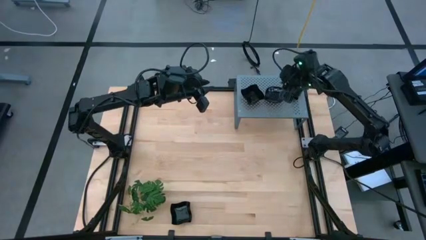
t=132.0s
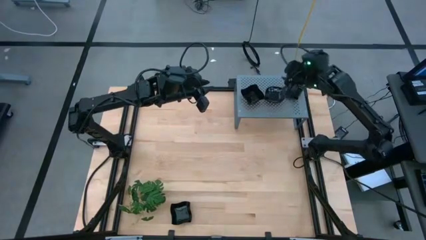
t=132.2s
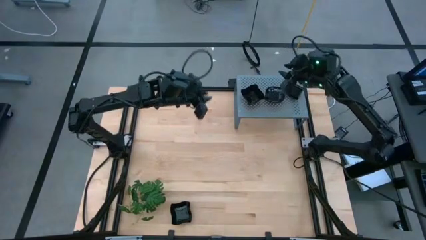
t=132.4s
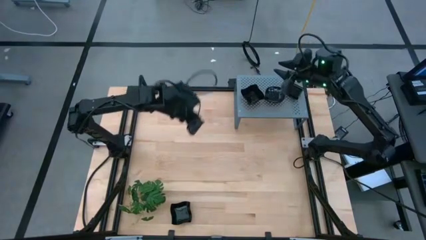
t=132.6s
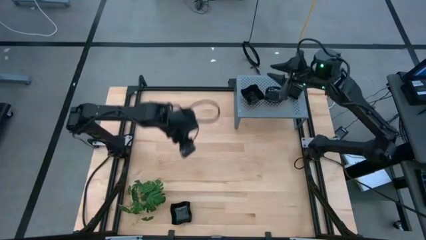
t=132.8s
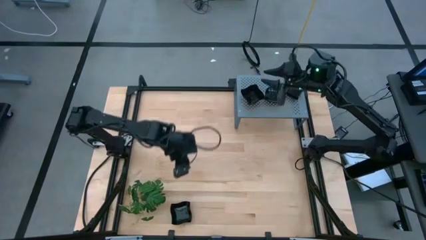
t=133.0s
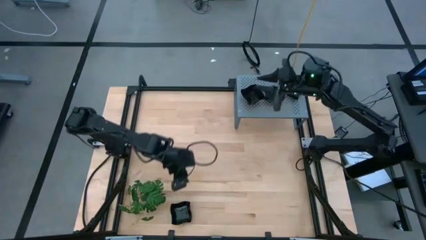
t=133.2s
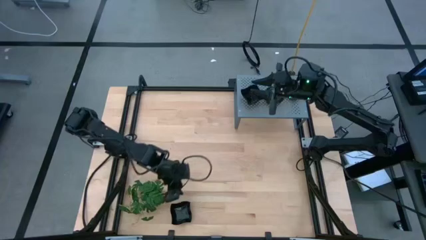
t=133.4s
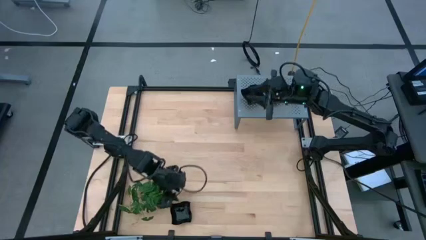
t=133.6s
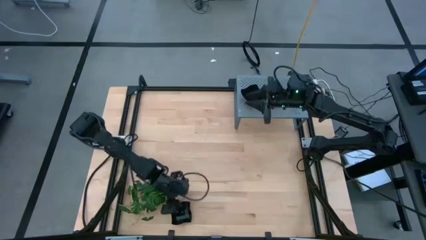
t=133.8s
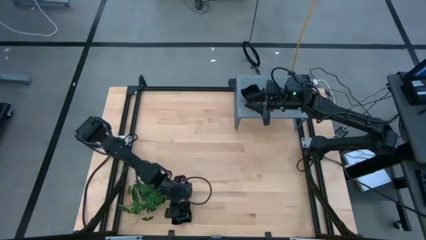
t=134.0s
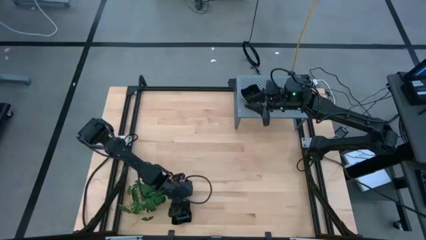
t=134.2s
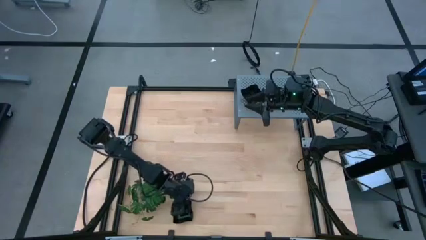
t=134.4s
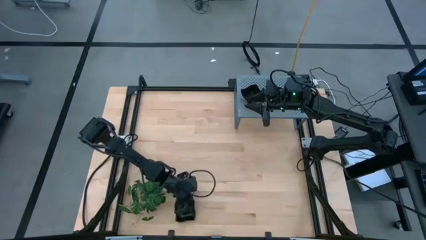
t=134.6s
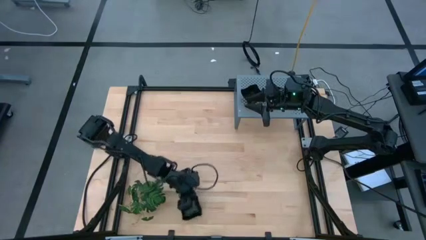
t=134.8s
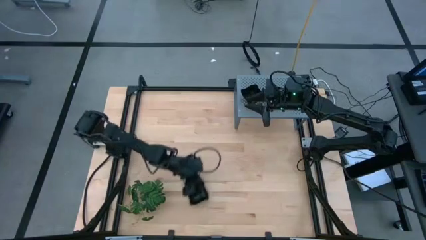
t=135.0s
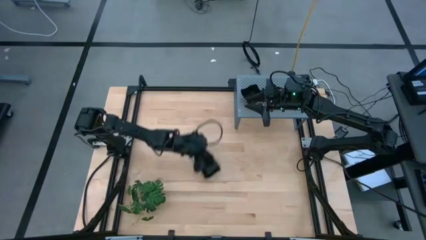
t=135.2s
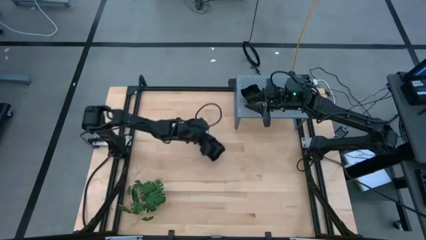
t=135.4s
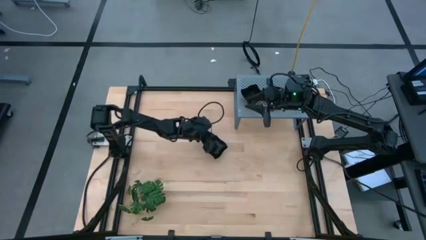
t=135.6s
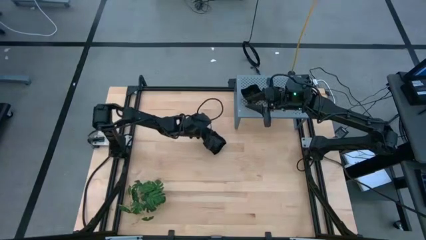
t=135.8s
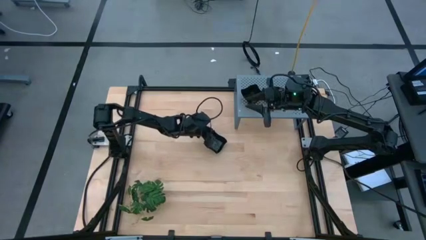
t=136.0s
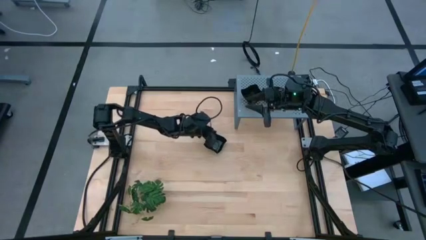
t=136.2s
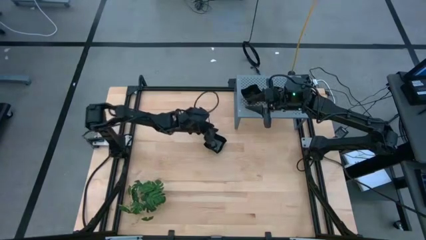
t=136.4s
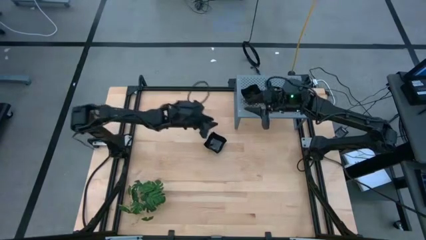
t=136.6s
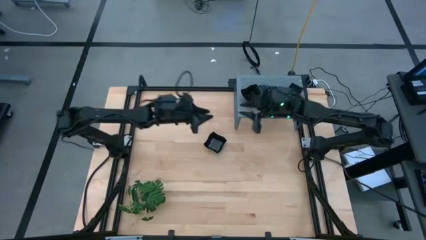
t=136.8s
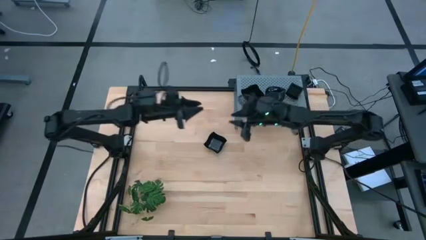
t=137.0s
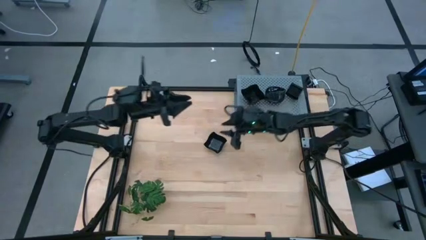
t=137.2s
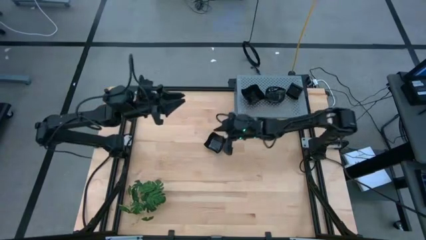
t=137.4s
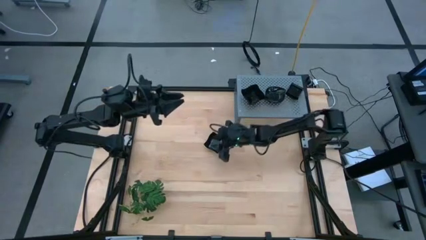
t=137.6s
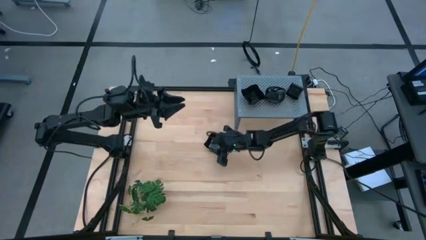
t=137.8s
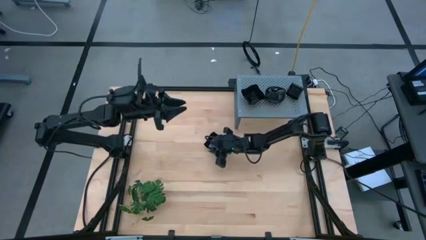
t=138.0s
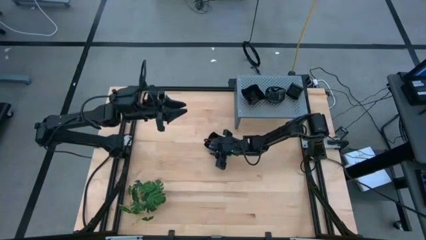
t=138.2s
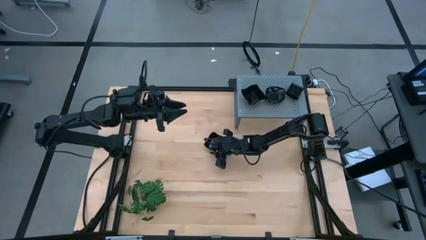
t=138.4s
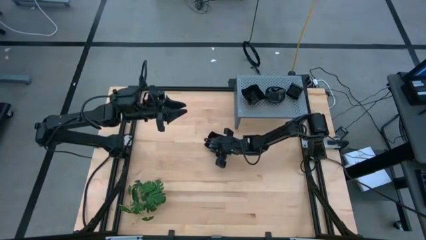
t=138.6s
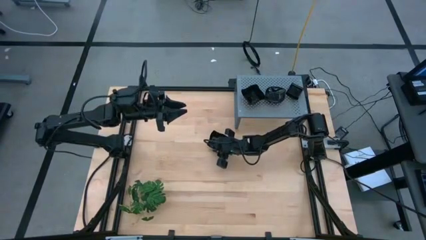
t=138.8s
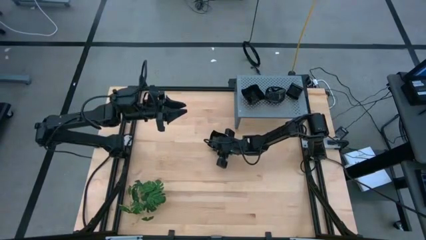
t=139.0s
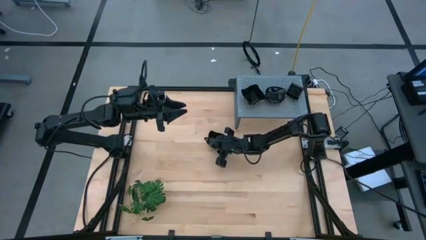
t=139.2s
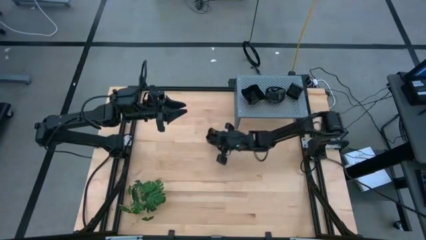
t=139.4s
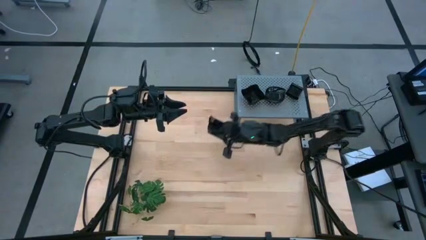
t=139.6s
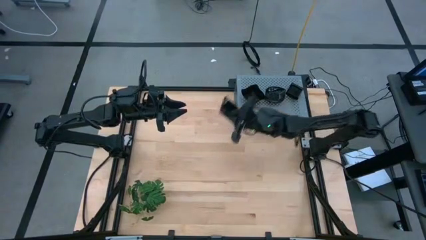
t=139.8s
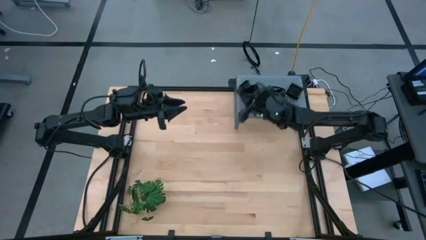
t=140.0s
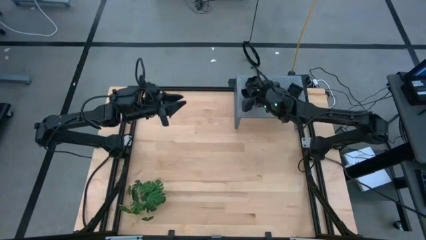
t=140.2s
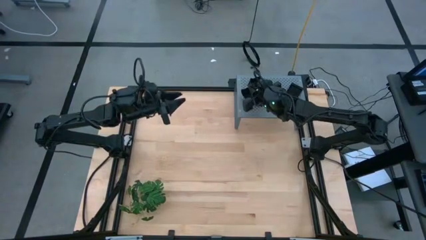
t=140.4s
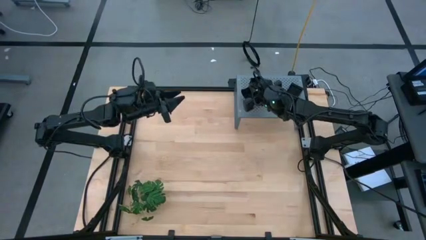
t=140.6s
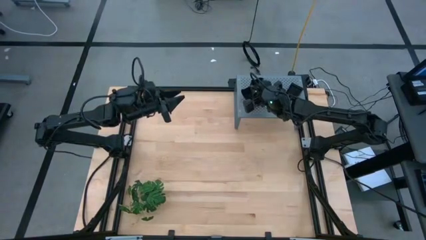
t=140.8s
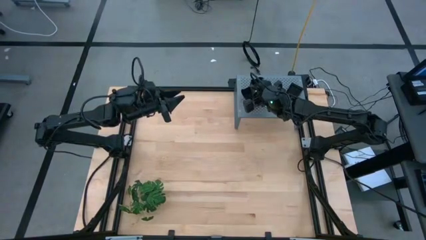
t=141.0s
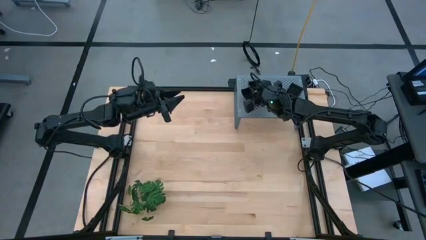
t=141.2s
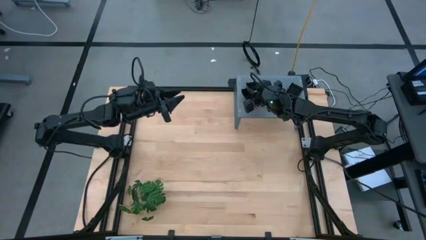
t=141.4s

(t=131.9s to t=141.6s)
Task: Pick & Place Mini shaped plates
Stack the black distorted square plate on top of the black distorted square plate on the shelf

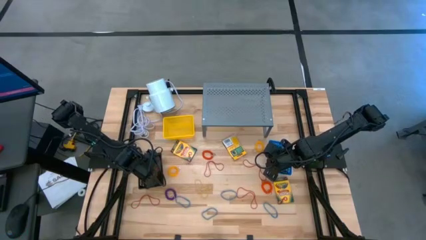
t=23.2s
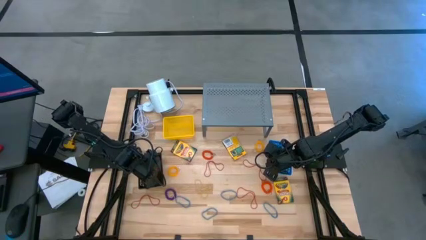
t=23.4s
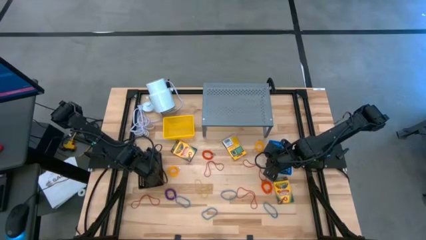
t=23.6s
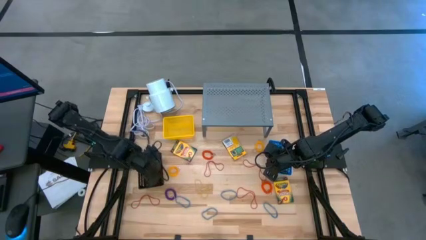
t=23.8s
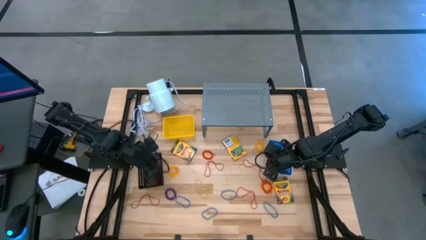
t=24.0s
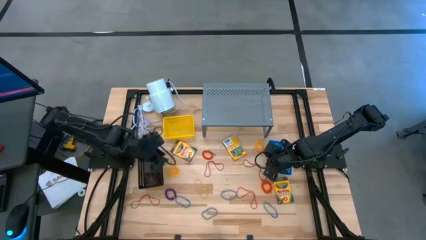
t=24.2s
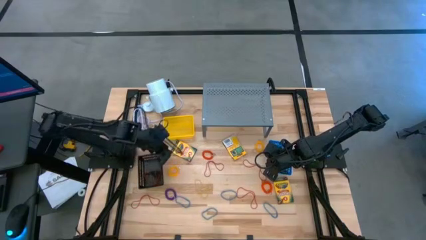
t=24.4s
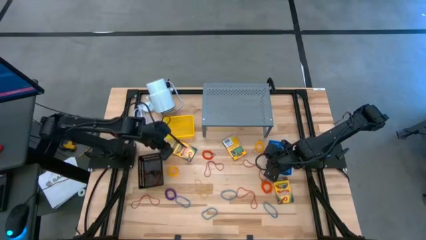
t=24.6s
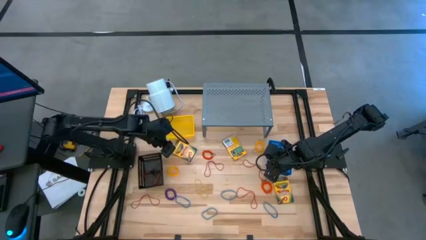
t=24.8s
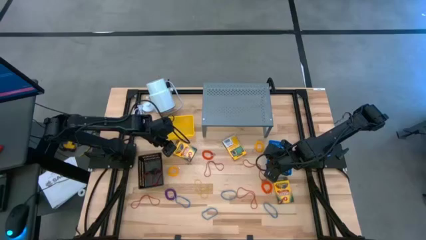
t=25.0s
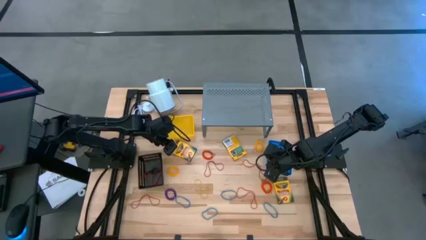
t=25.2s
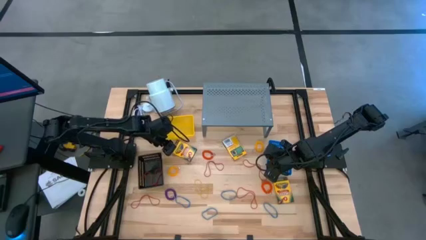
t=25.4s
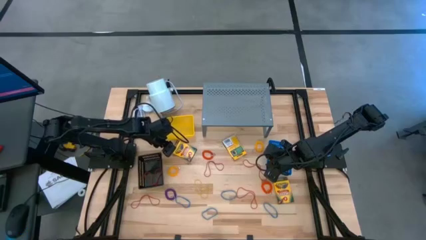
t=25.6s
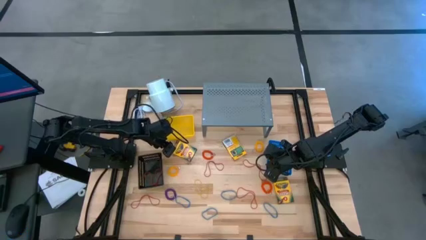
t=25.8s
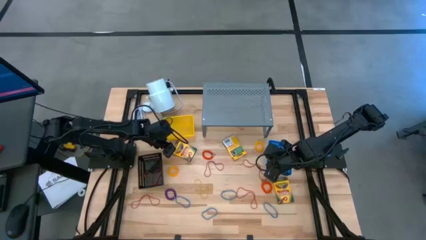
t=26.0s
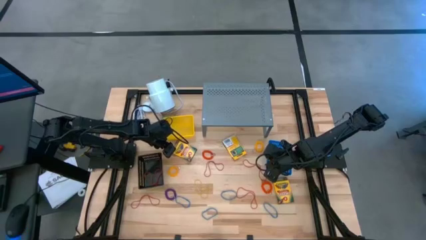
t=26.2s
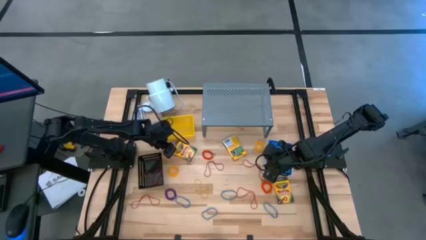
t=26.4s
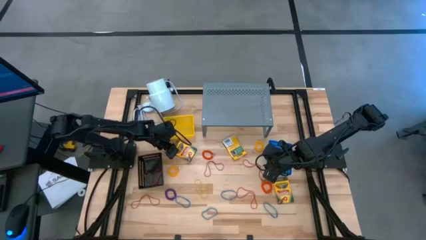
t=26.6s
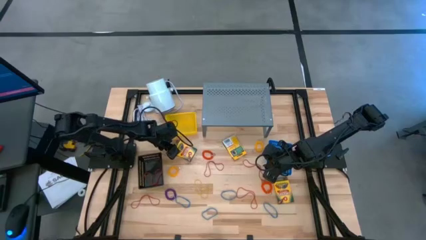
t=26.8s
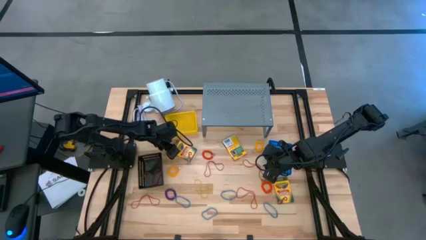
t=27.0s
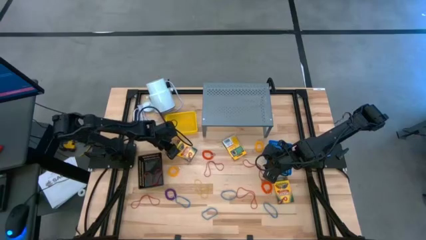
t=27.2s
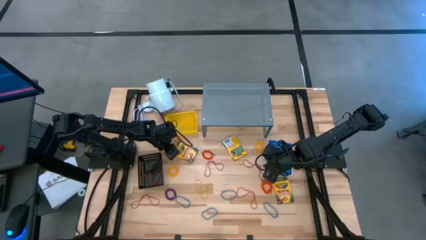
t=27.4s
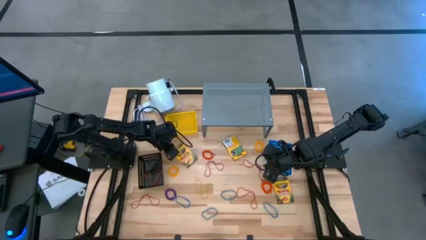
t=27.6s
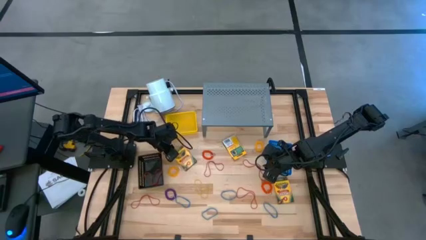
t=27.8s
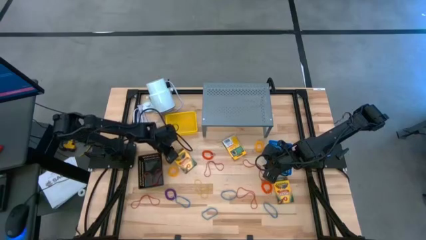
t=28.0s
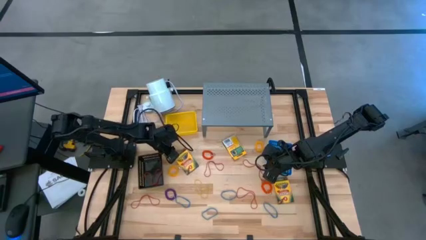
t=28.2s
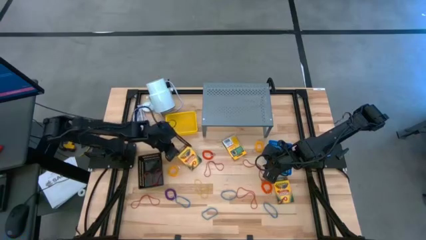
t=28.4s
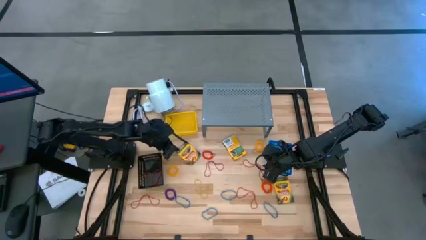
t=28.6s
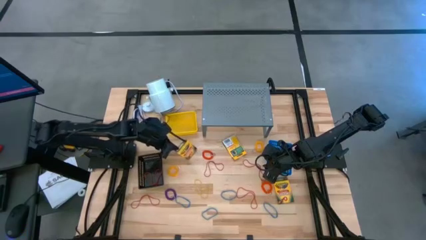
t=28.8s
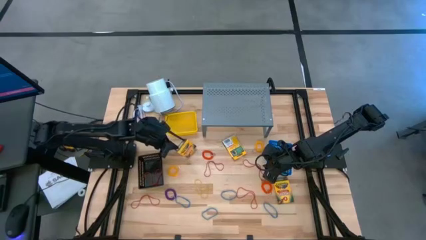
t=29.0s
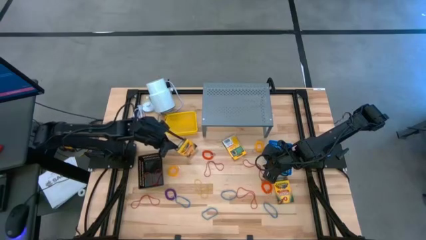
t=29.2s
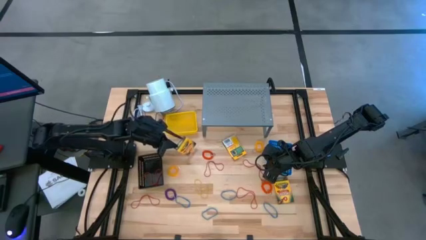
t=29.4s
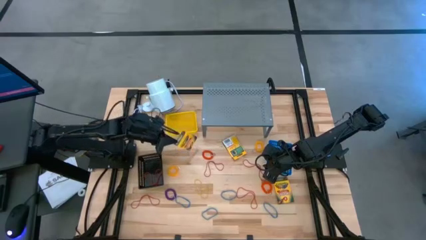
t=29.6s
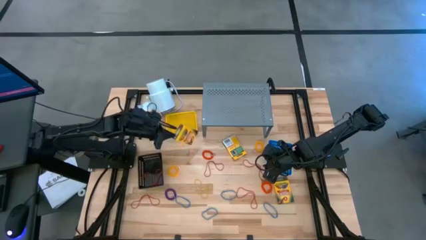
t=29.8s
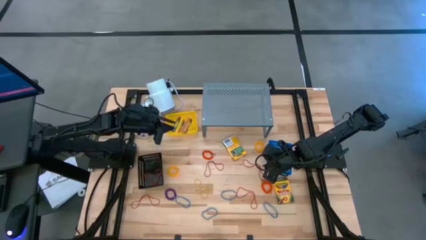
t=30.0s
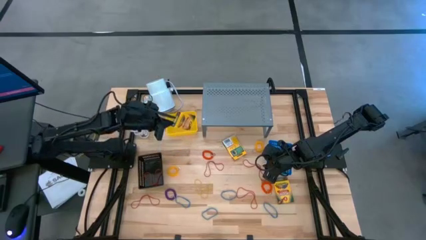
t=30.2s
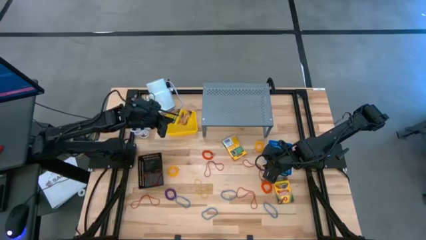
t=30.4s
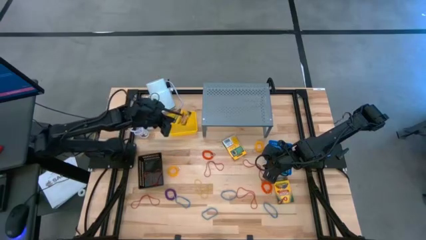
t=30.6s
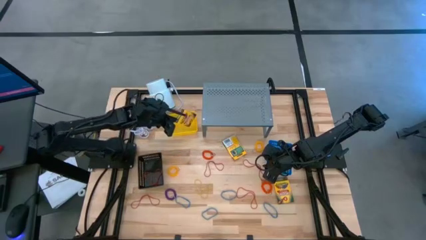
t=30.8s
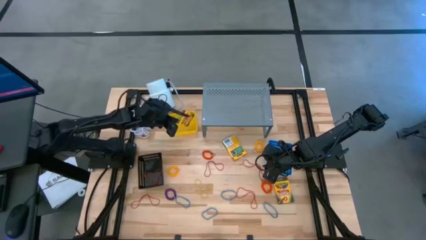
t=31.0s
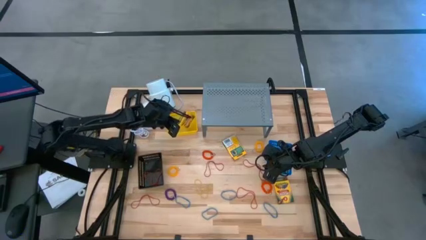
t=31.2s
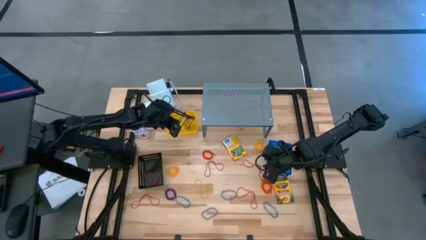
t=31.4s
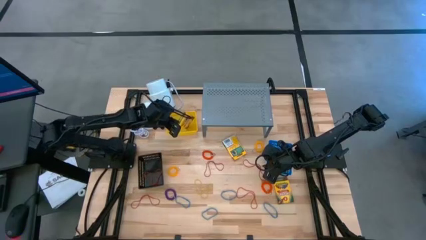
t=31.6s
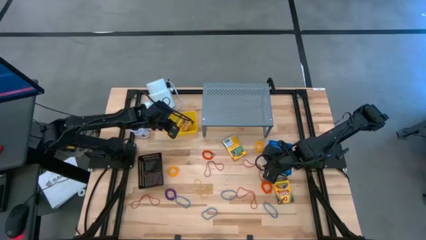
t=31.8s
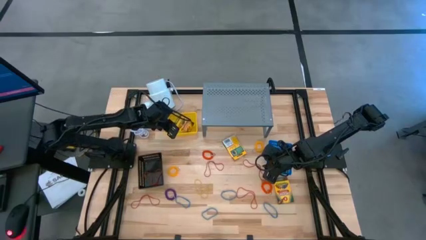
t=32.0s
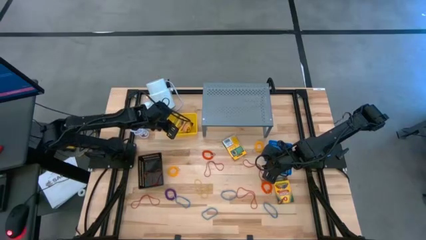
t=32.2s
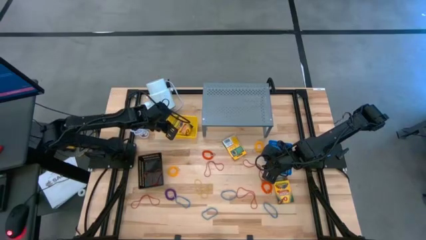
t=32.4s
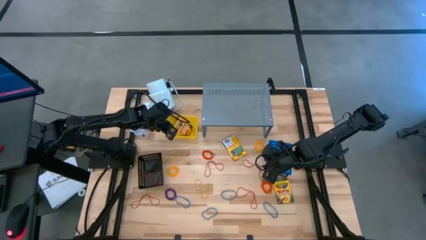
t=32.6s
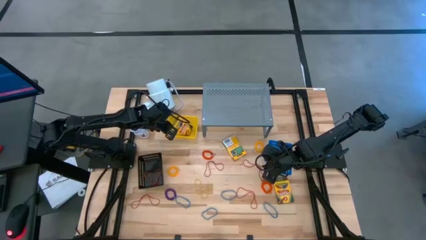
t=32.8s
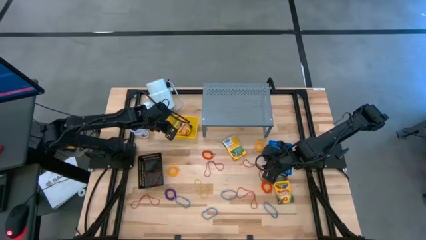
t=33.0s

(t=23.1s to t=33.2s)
Task: Pick & Place Office Desk Supplies
Put the crayon box into the yellow bin
